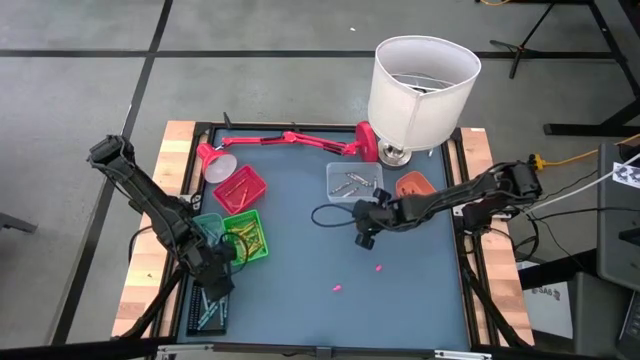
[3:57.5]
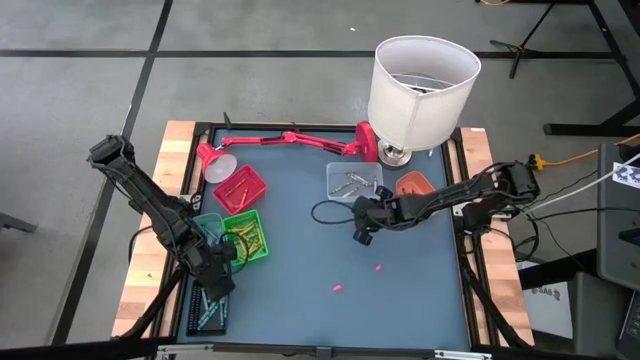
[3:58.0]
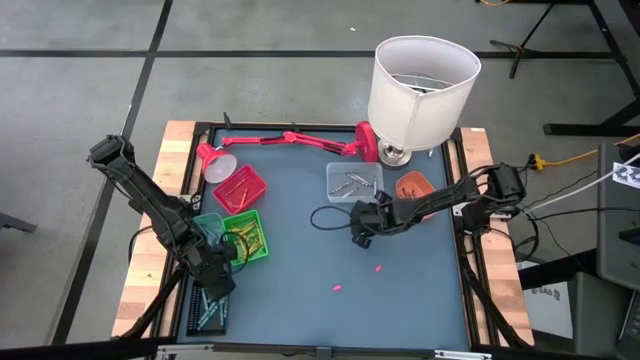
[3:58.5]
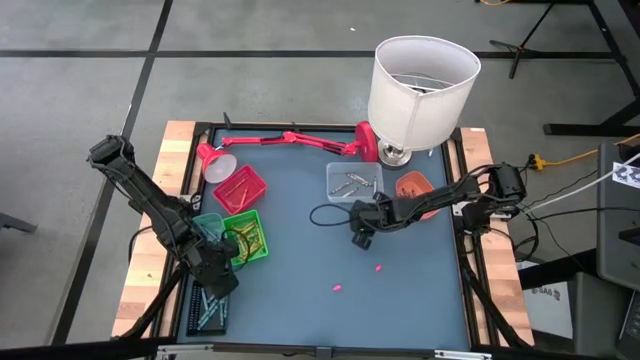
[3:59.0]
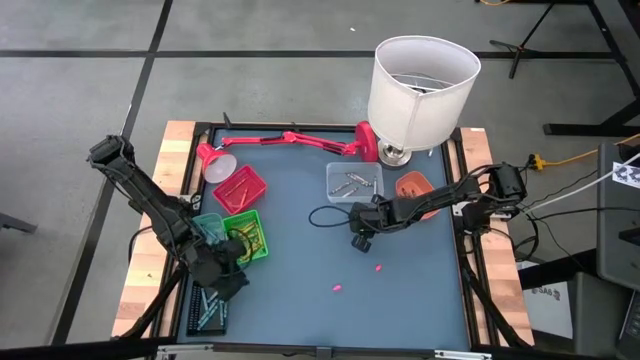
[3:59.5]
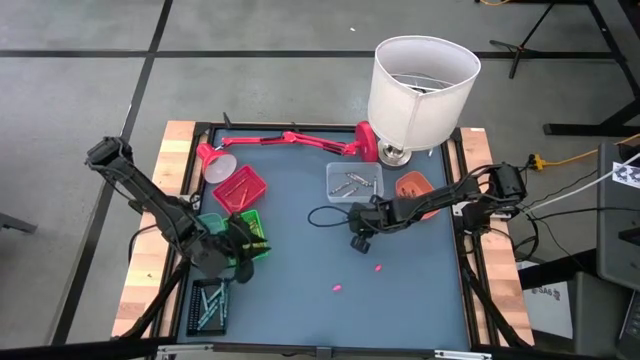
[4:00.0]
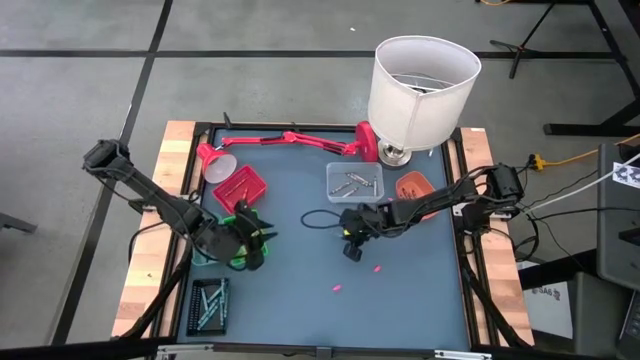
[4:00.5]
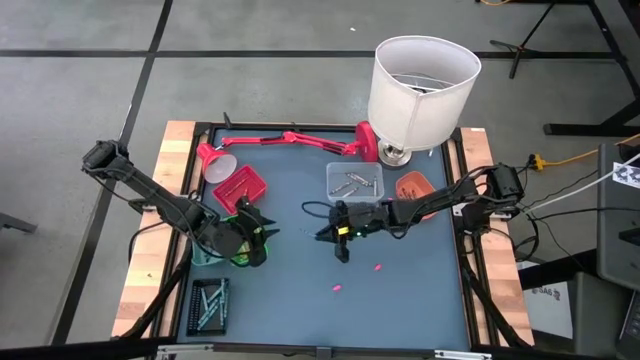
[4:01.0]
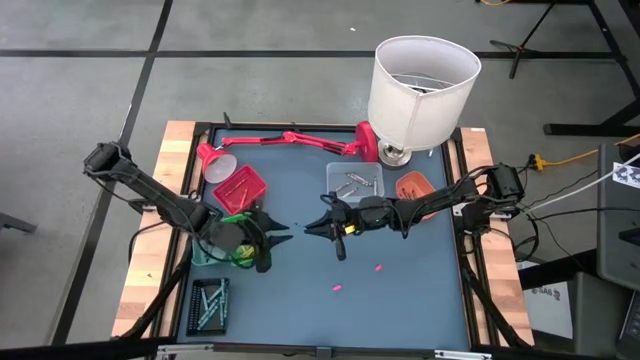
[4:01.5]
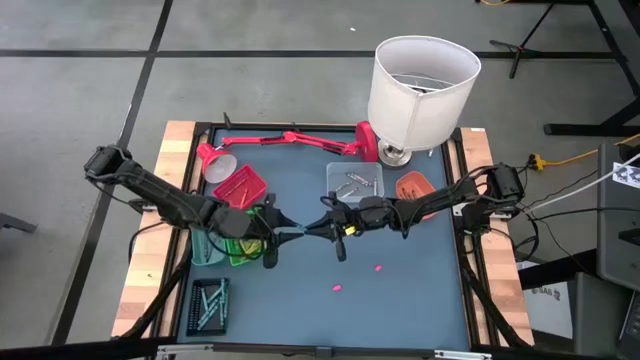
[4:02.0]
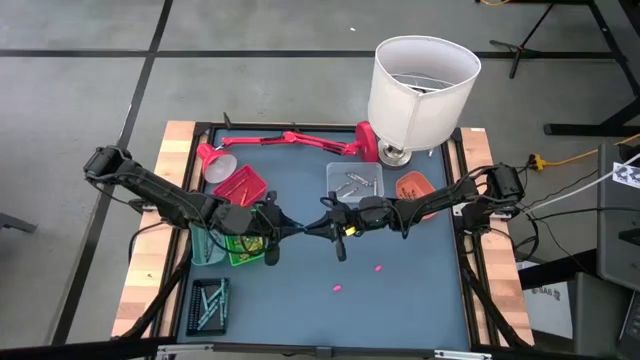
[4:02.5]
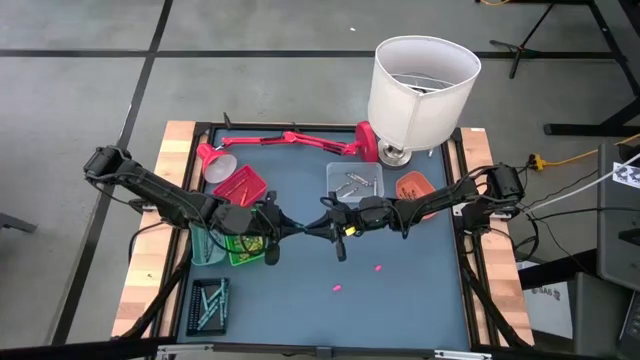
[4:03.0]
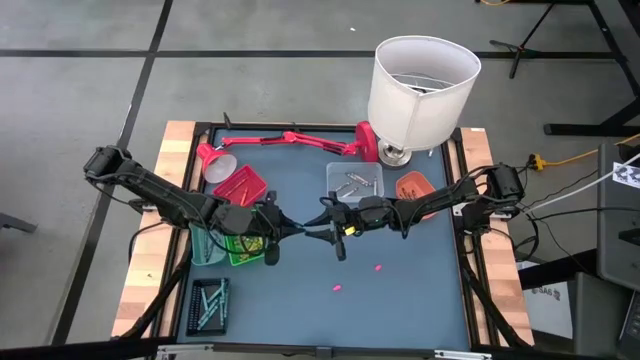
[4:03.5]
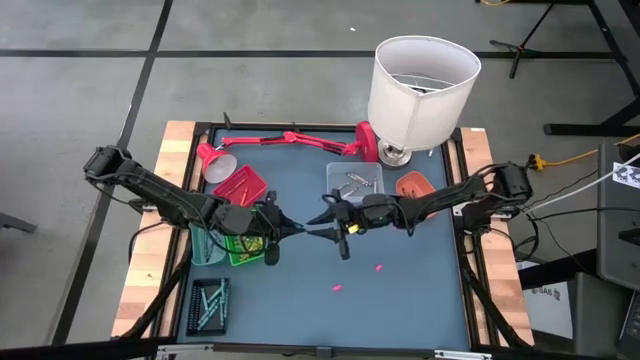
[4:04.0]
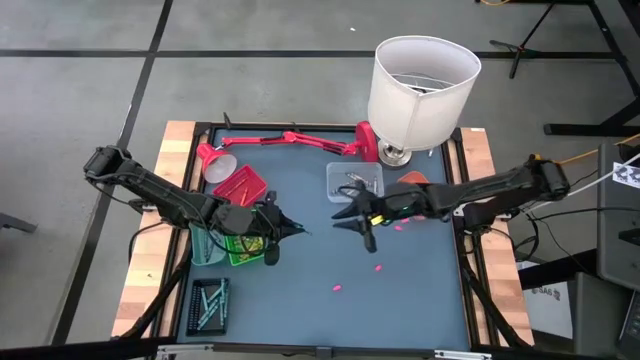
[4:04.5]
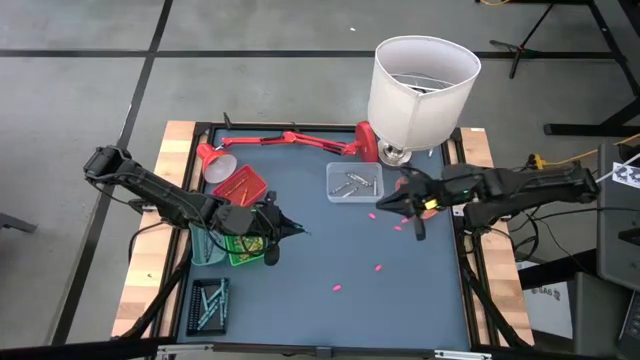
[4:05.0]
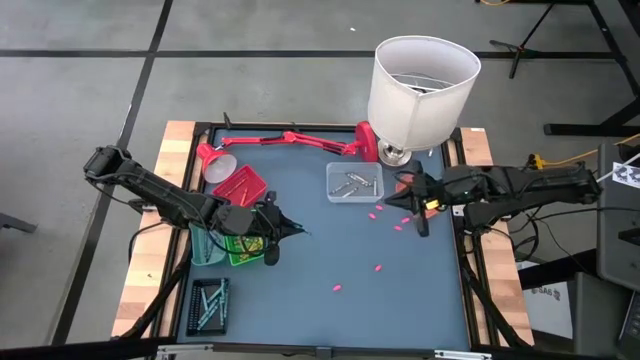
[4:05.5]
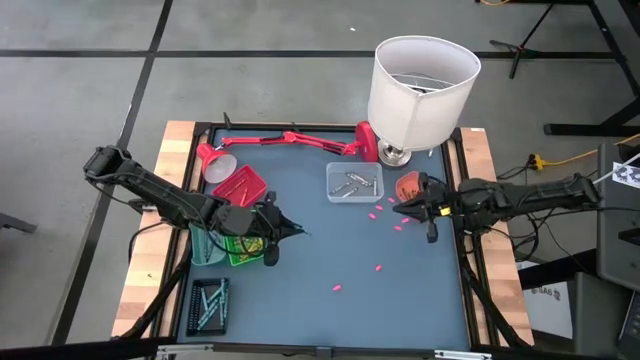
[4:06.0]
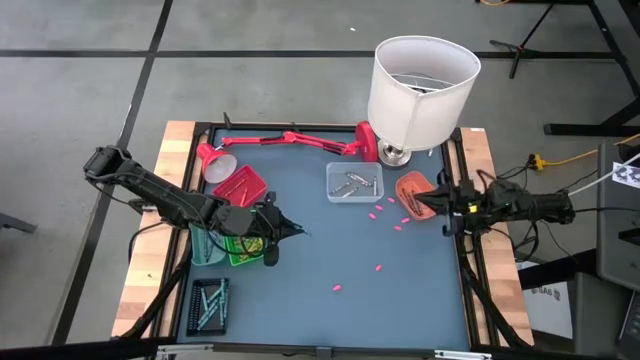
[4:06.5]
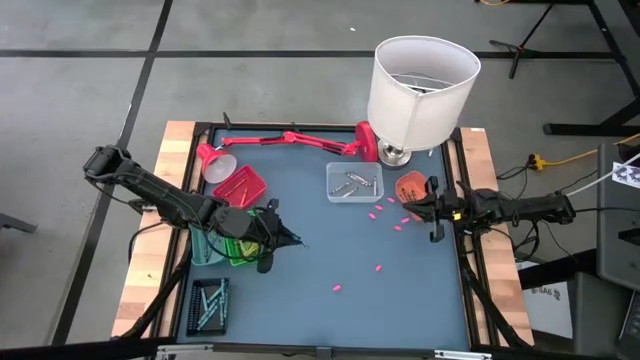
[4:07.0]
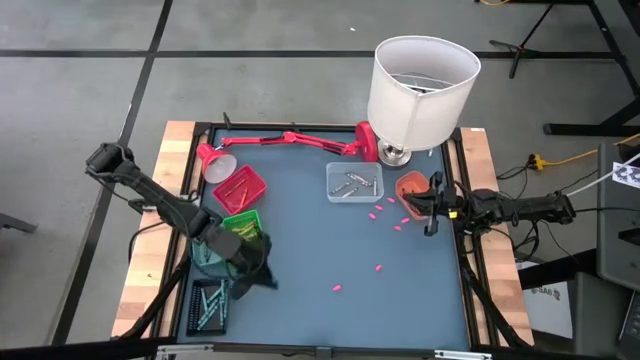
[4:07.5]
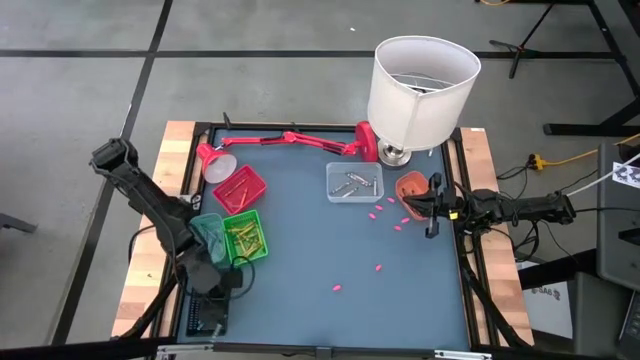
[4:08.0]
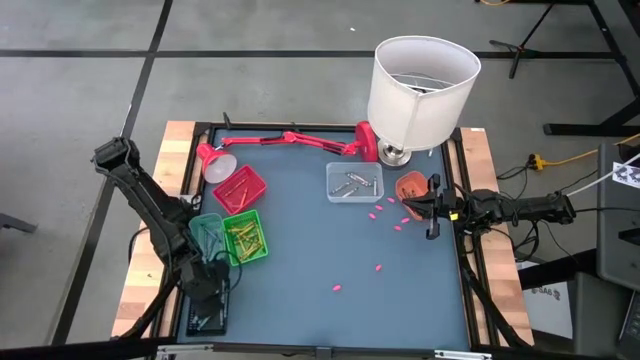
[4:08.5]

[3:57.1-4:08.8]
Task: Sort crayons
Put the dark green crayon into the black bin

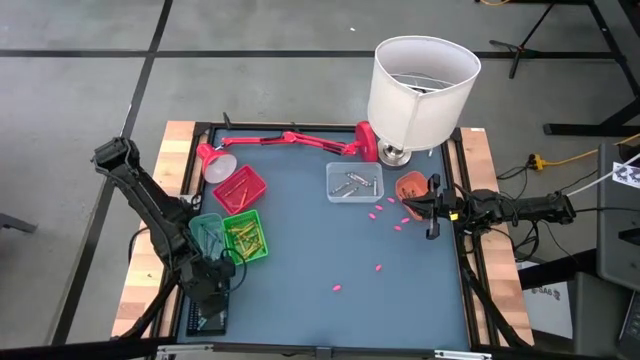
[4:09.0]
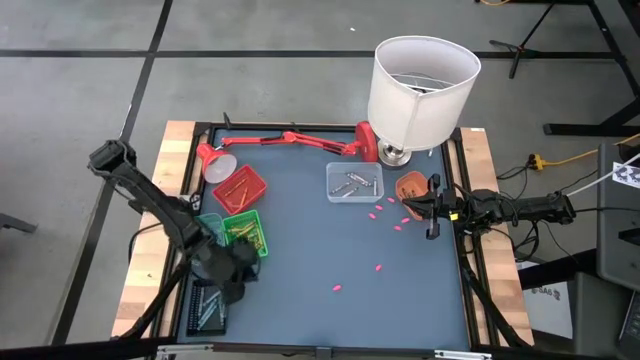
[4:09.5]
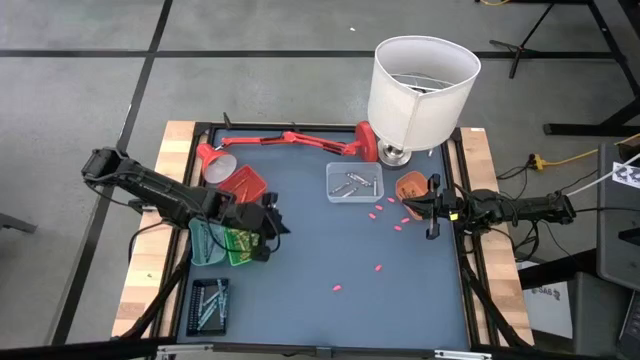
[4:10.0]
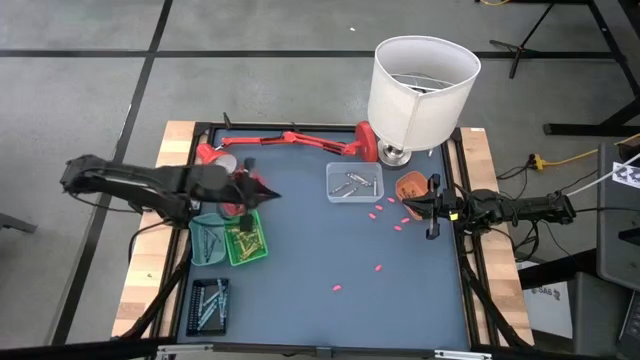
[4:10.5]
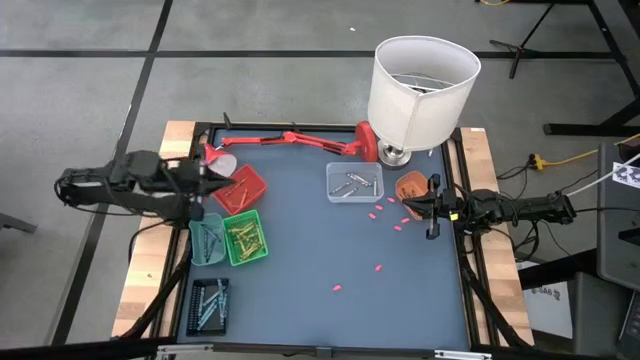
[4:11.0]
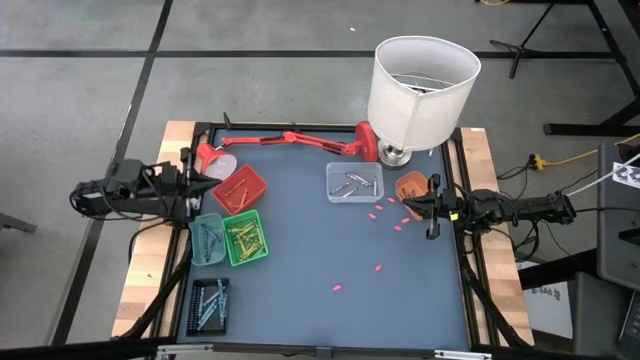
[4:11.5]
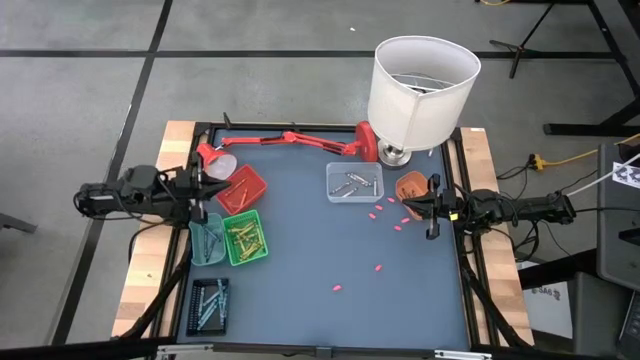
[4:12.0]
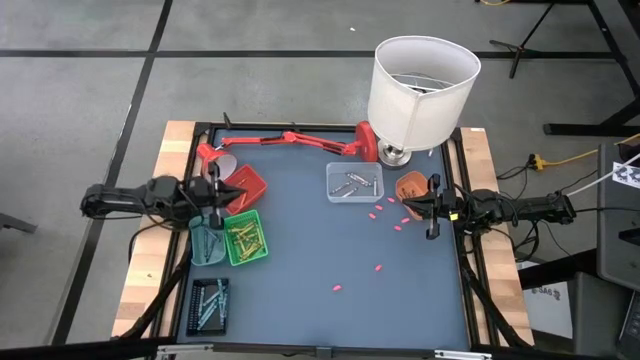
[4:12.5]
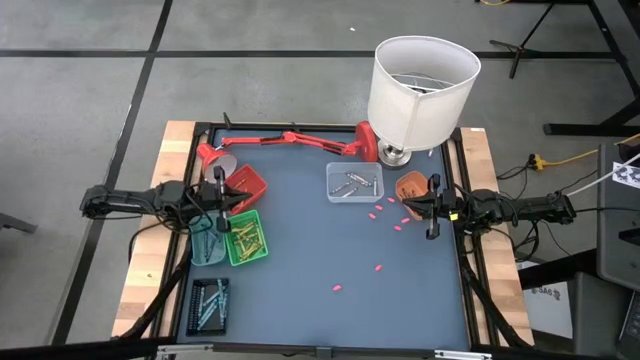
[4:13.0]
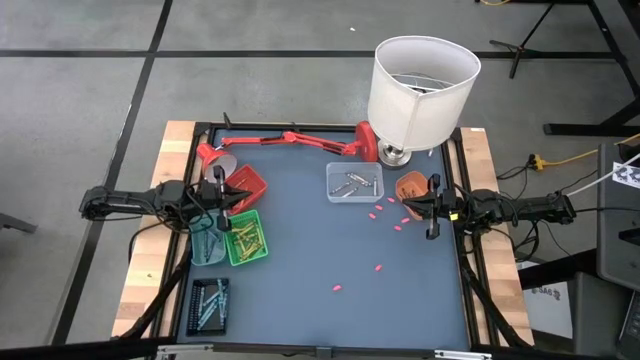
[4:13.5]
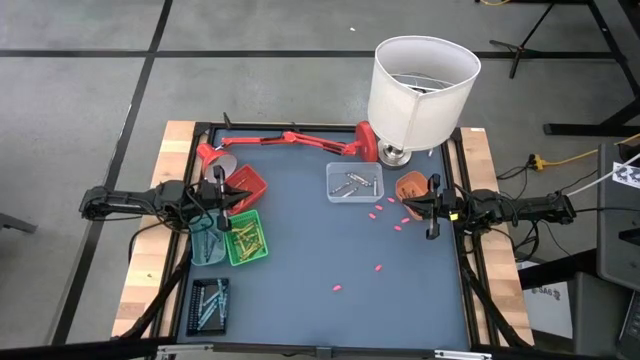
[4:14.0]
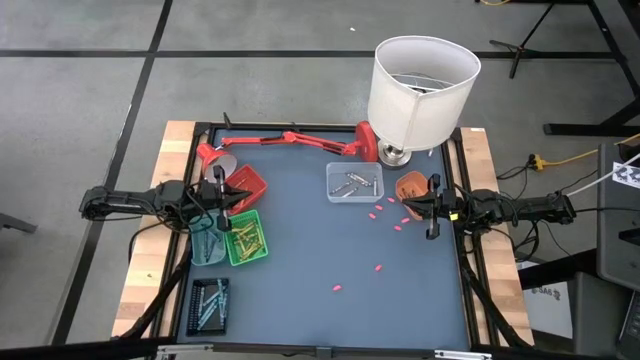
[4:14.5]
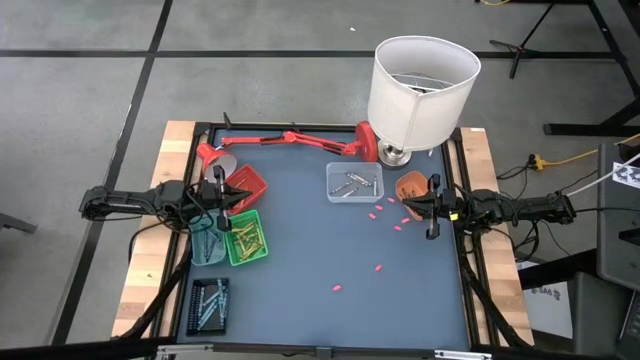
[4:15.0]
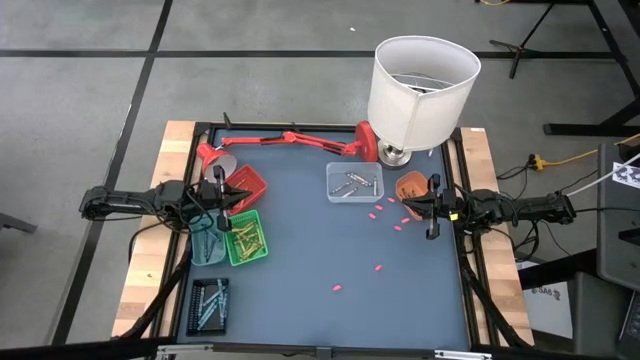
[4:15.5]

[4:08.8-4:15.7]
Return to Home Position

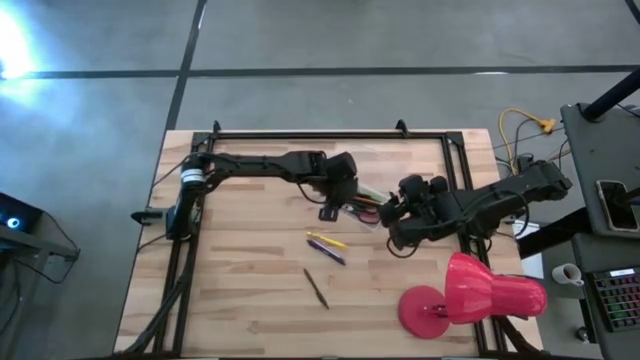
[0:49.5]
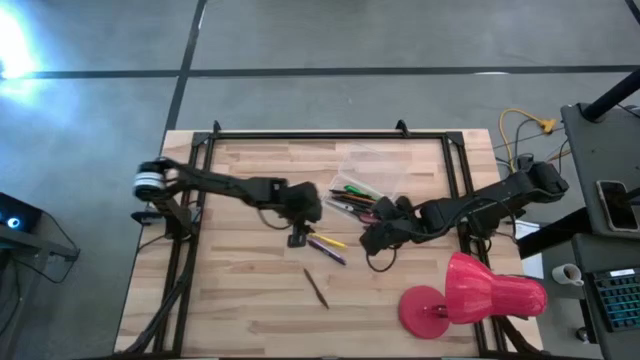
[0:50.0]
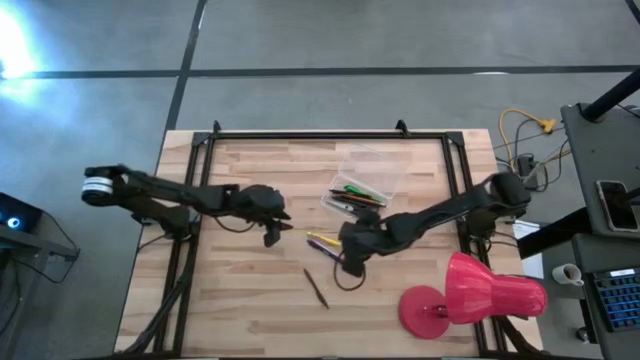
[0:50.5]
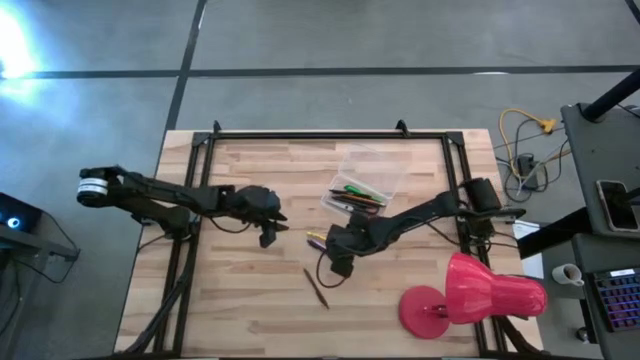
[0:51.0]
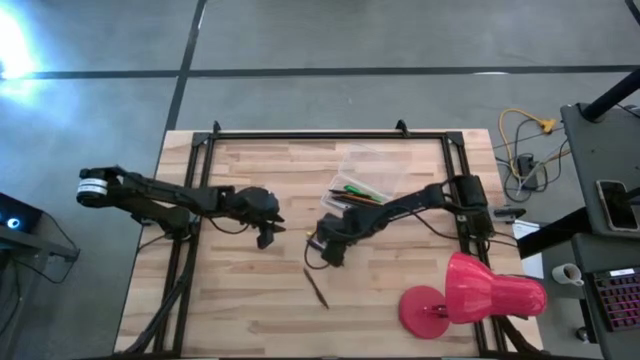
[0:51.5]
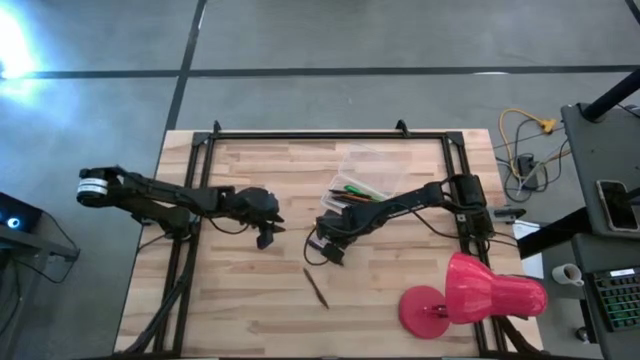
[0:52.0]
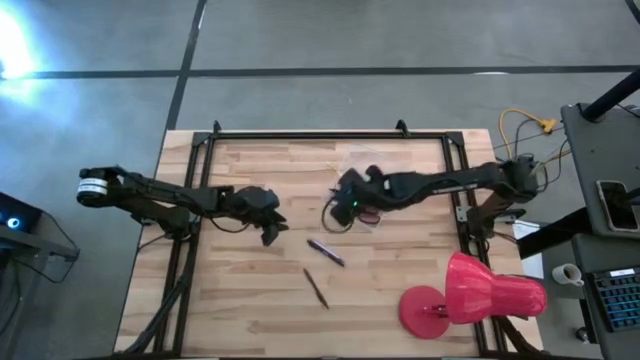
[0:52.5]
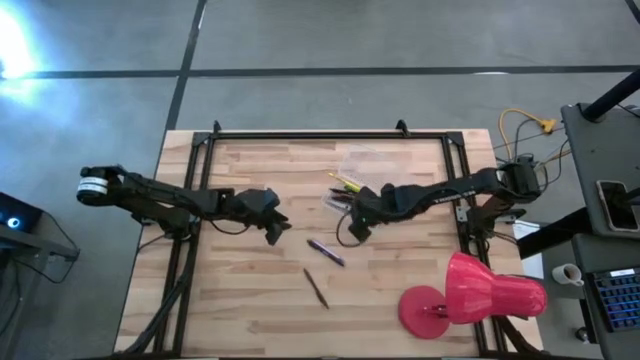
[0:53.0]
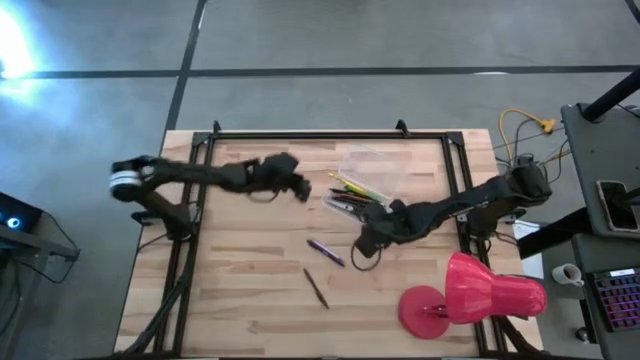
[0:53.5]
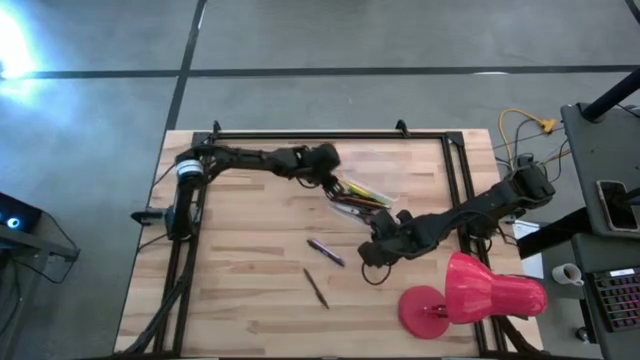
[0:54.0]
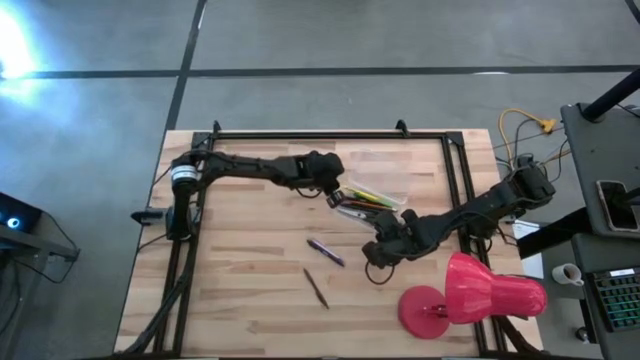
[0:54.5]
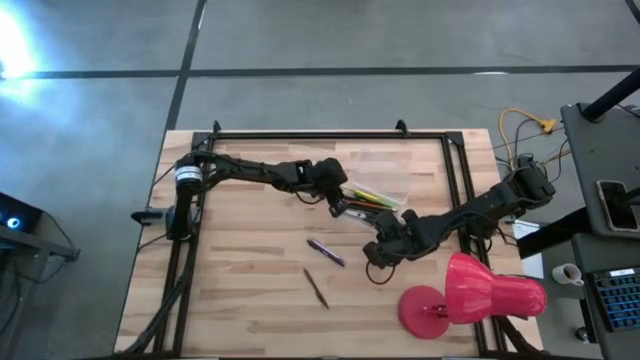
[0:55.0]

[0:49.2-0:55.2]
Task: Pick & place school supplies into a supply box
Put the yellow pen into the transparent supply box
